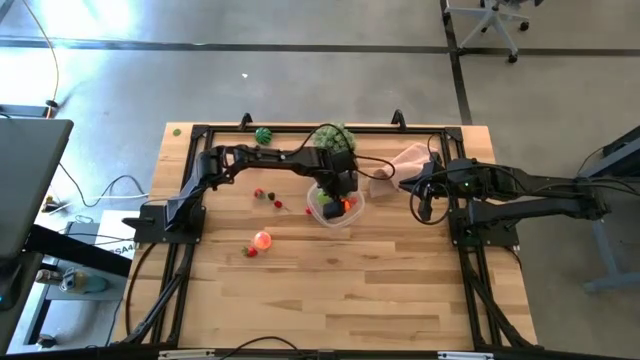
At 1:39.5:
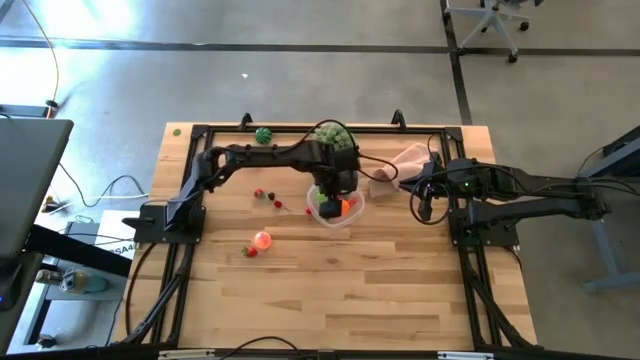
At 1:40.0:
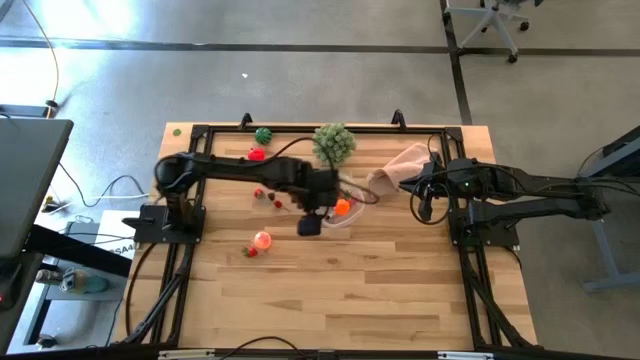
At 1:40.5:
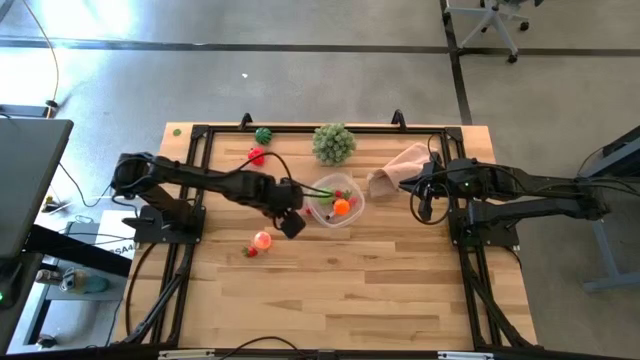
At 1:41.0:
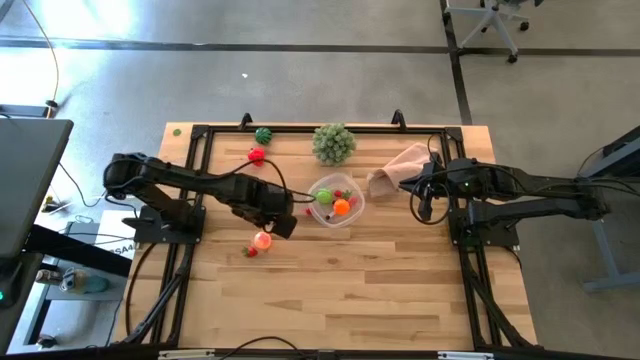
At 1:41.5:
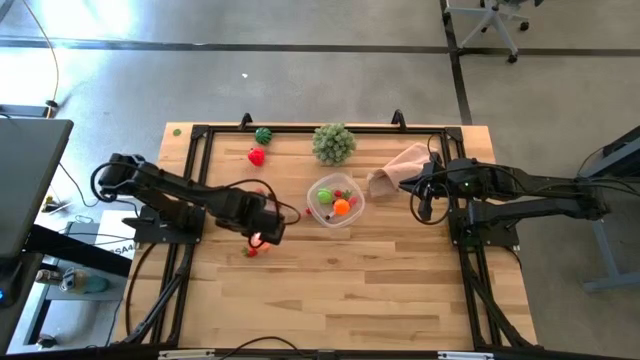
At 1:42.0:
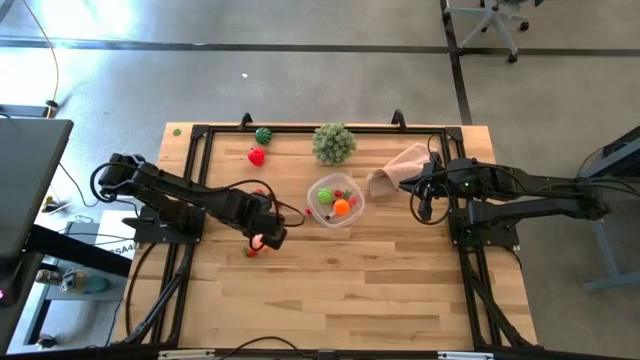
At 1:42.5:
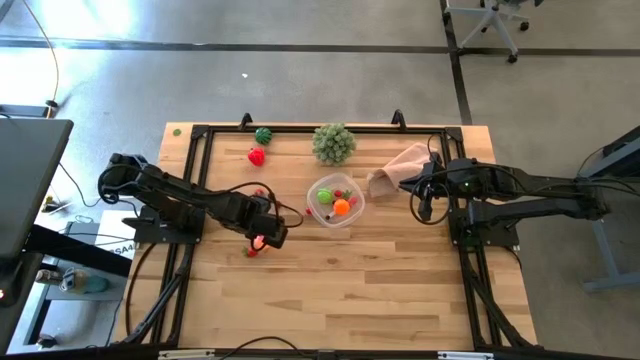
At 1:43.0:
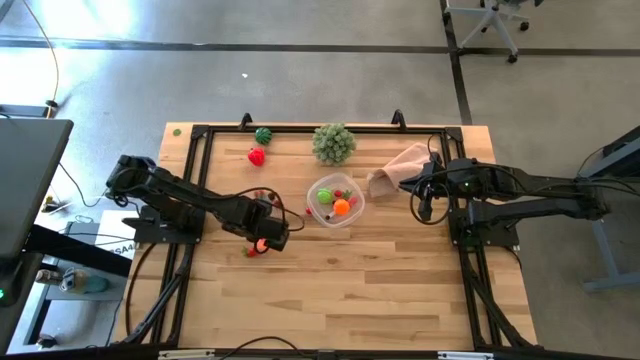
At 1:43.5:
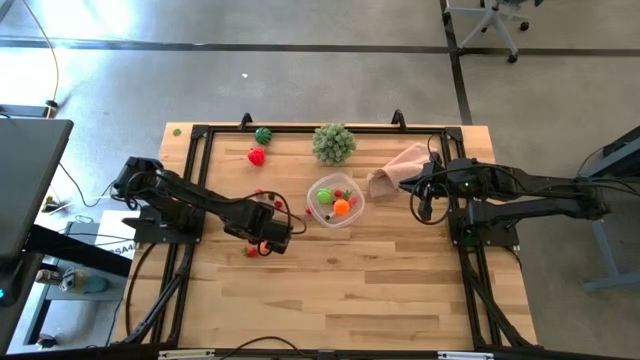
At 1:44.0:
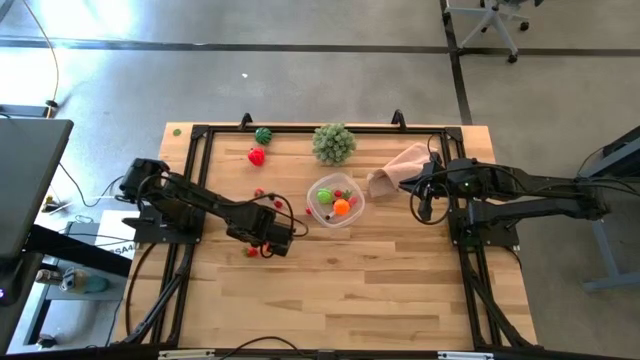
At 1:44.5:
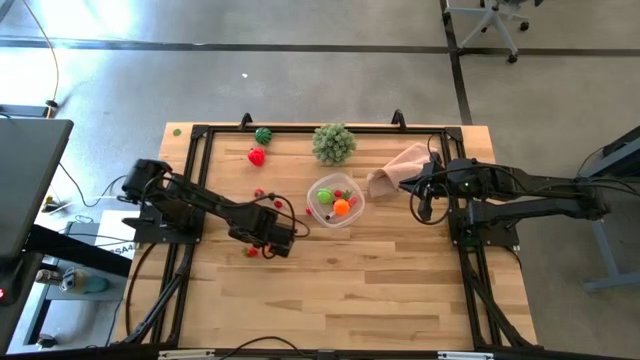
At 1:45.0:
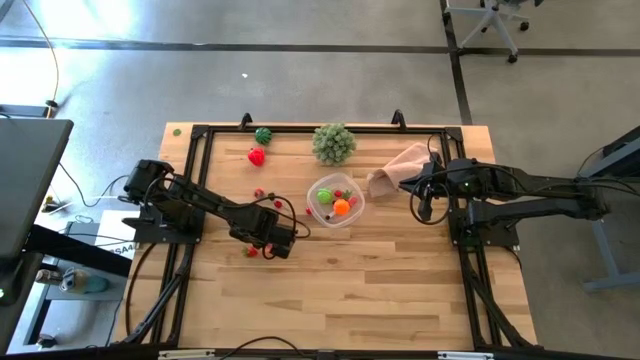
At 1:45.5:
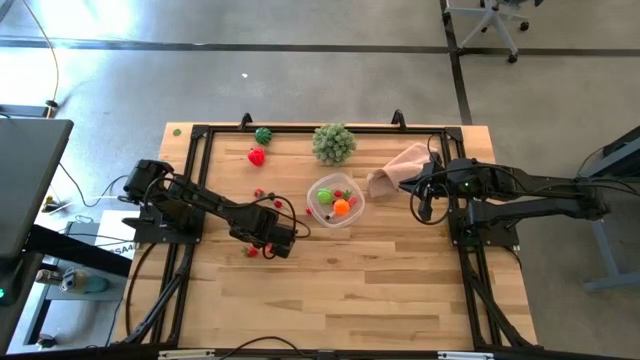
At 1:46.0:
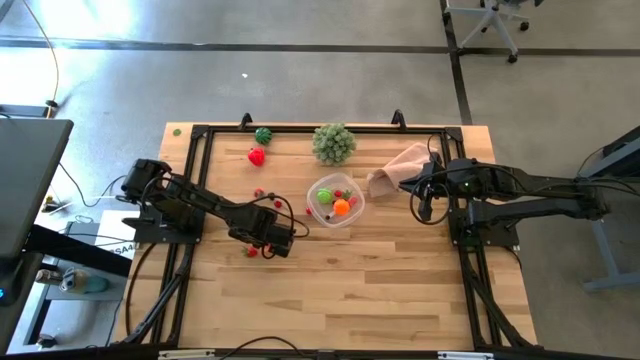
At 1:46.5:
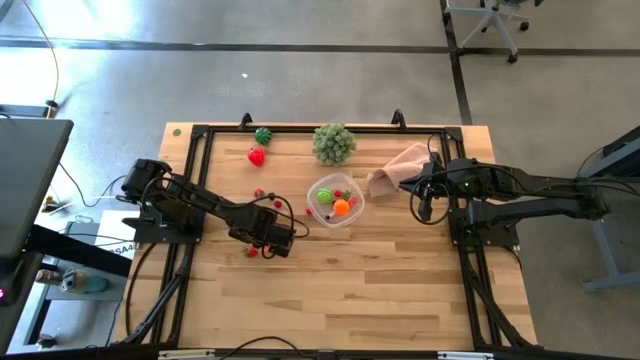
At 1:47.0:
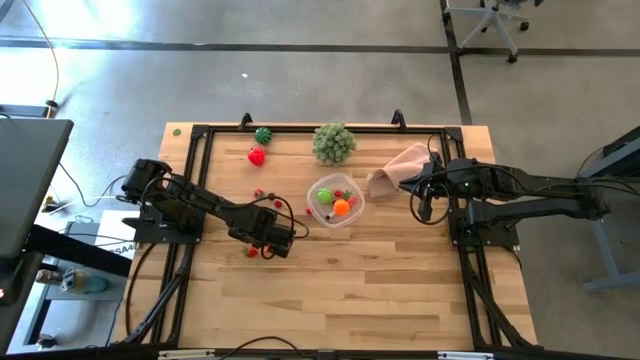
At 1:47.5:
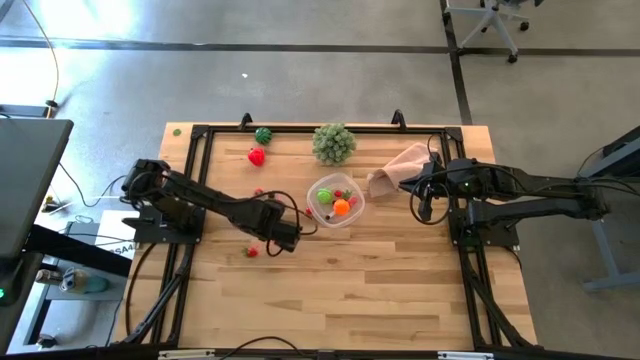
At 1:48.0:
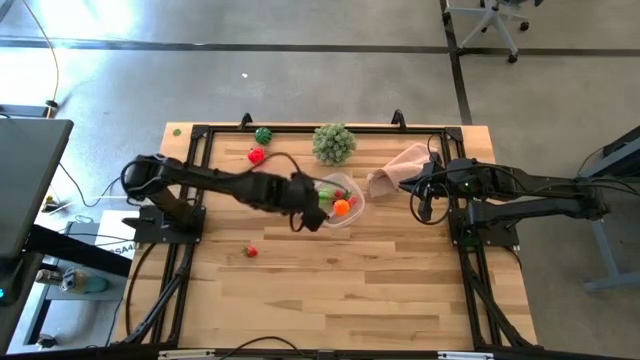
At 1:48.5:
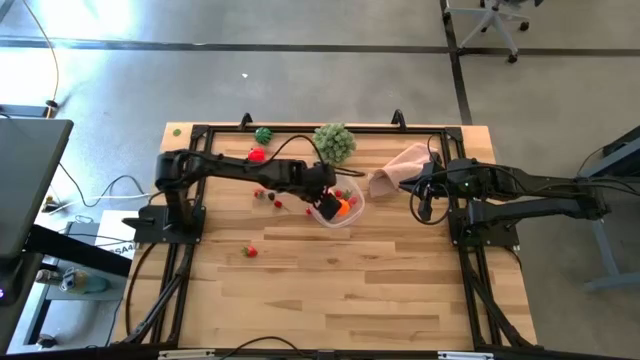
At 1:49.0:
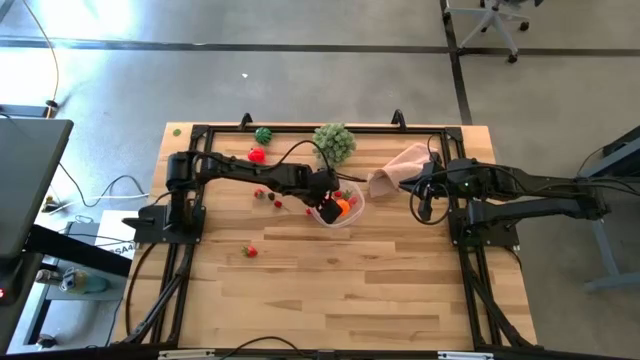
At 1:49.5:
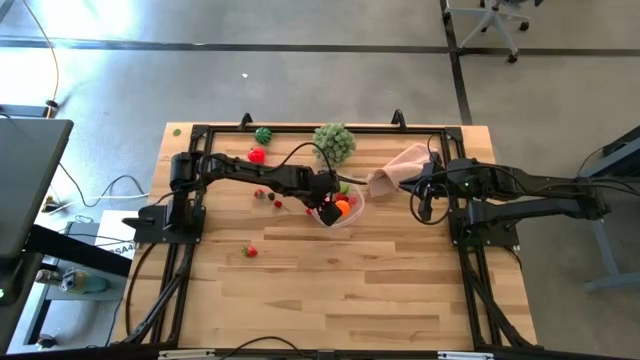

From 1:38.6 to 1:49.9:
Task: Pick and placing Produce into tupperware
Put the apricot into the container

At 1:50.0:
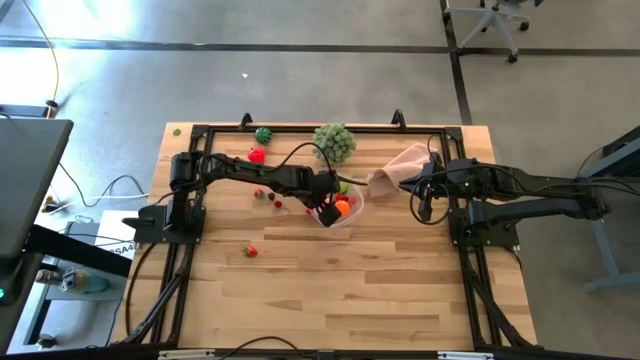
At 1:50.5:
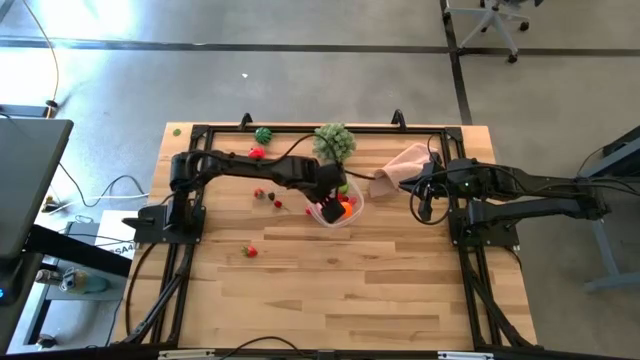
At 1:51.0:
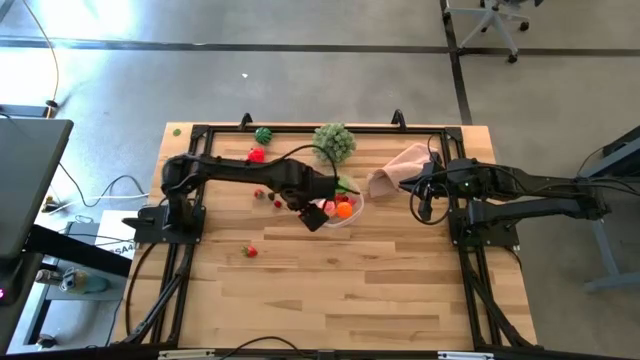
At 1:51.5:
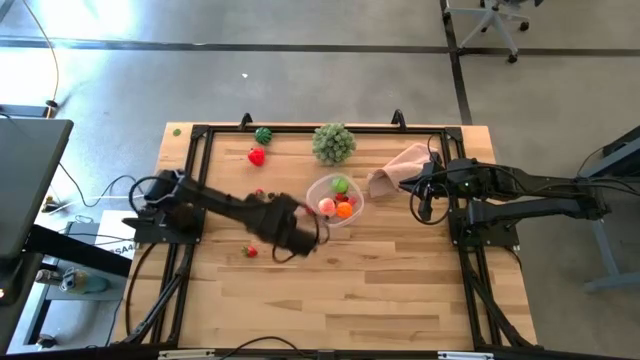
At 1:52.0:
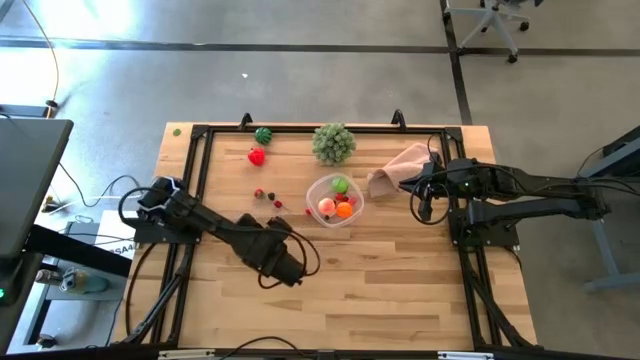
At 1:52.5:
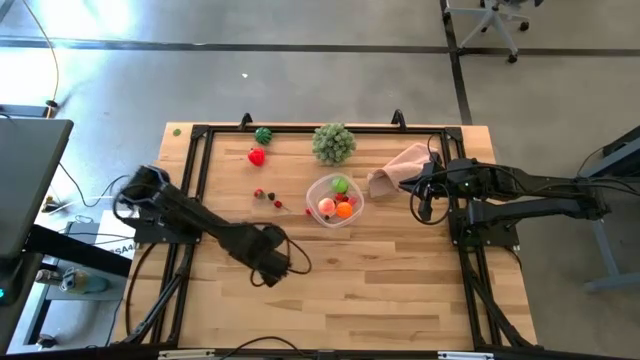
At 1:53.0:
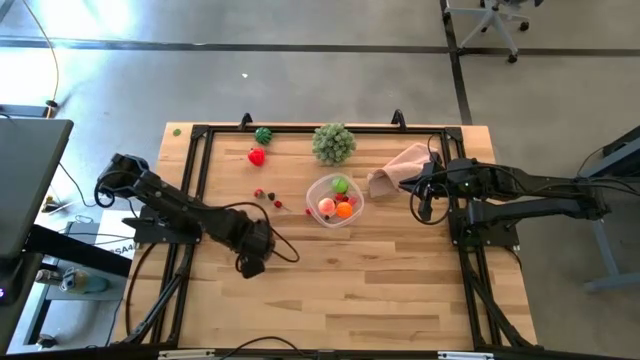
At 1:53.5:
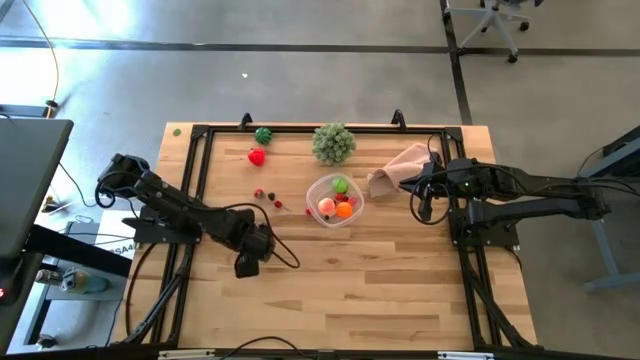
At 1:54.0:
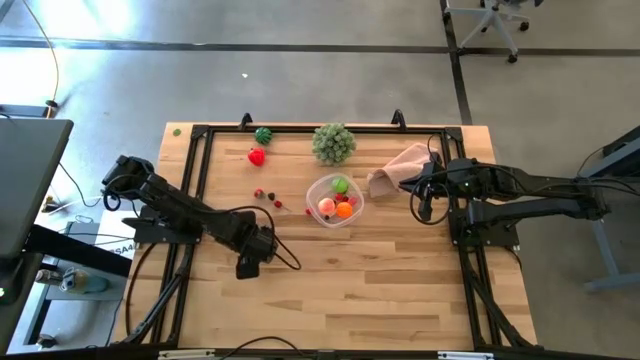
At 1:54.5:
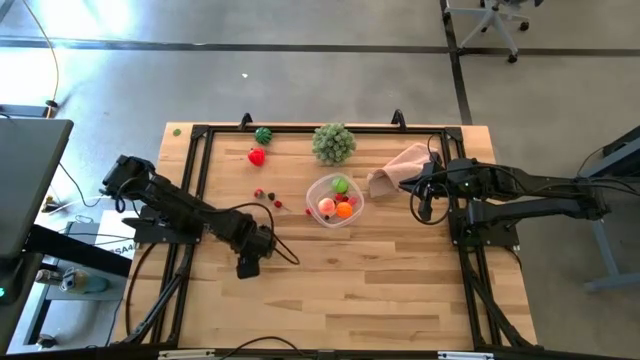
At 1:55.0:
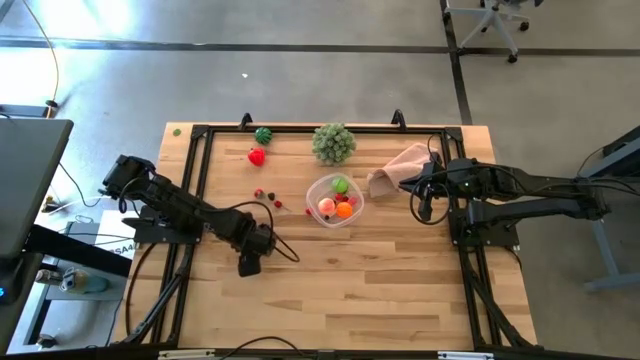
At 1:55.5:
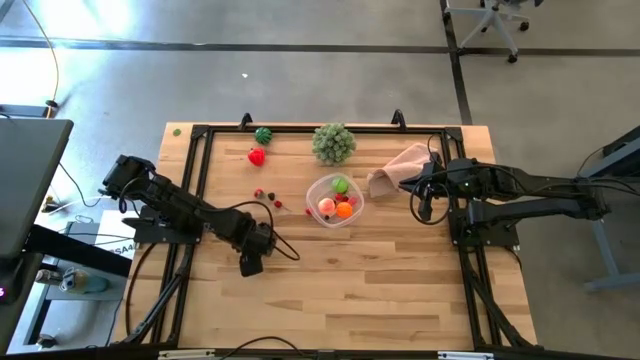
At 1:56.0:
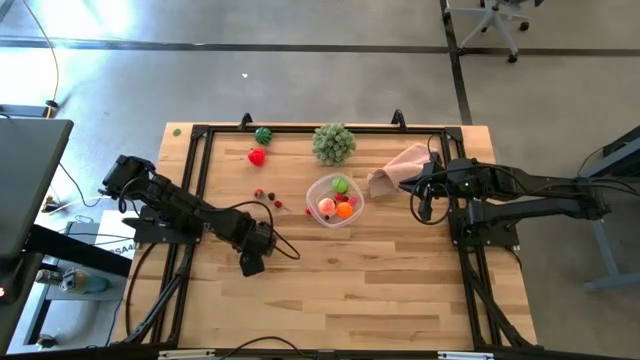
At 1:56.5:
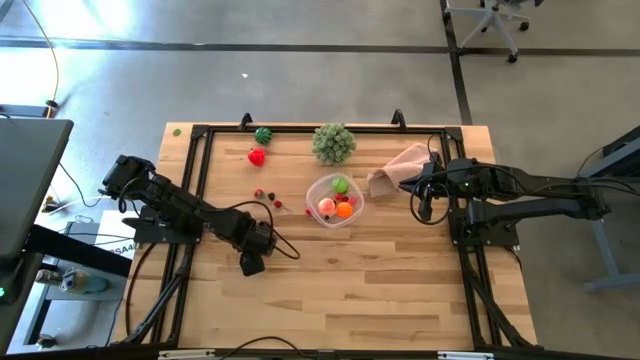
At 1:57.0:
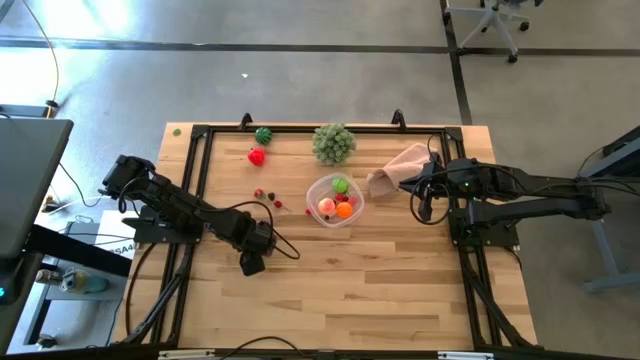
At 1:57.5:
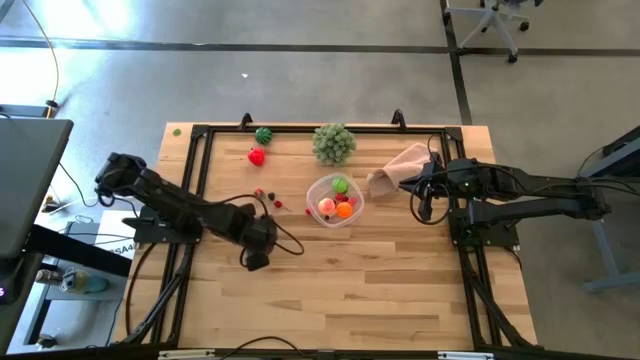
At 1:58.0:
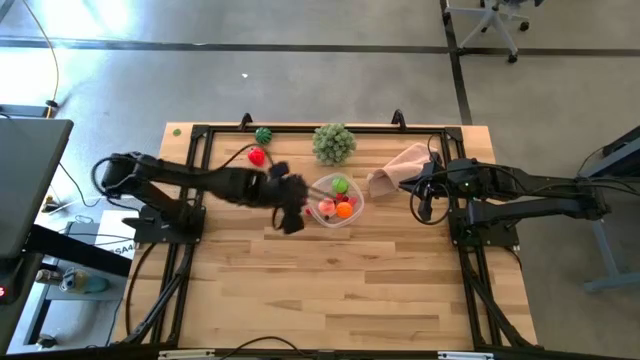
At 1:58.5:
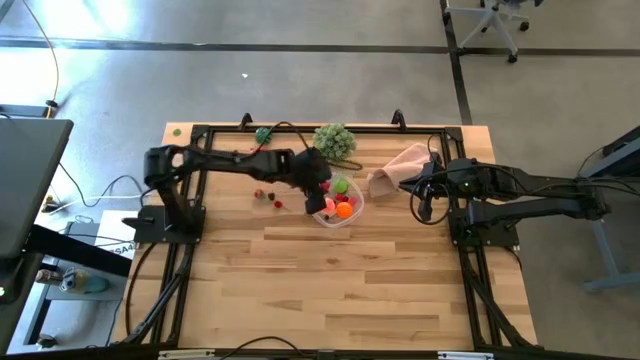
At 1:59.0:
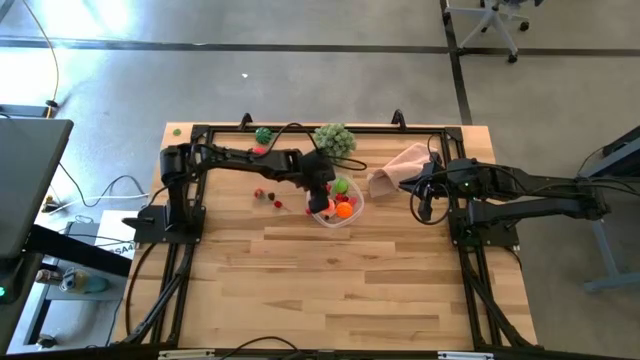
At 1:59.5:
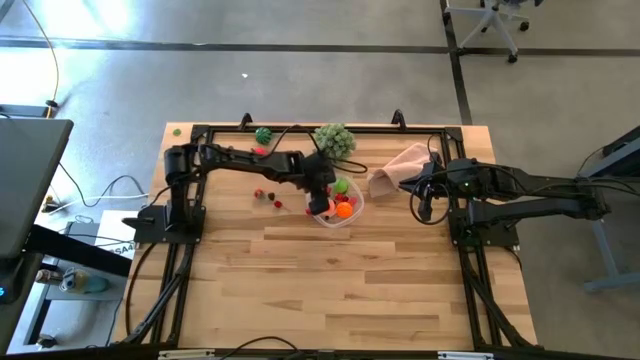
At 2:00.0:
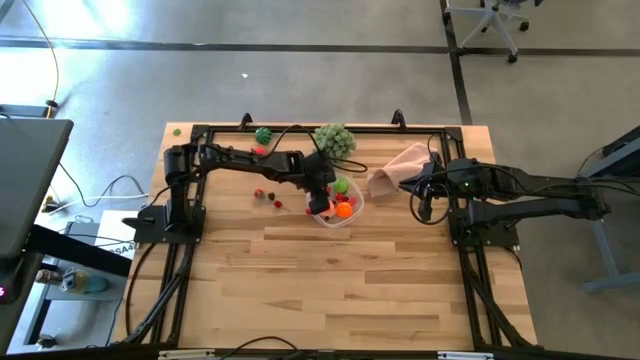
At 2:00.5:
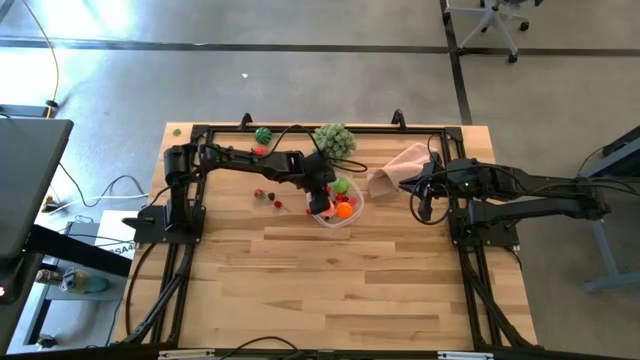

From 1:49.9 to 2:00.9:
Put the bottom strawberry into the container
